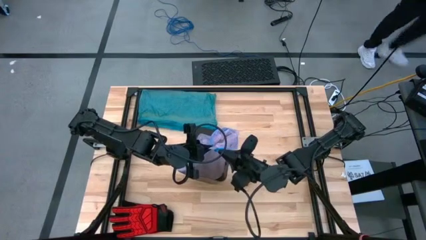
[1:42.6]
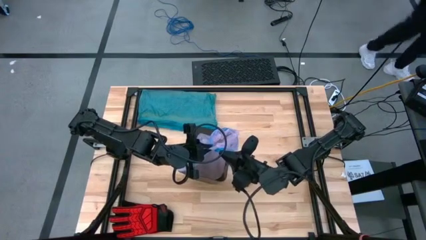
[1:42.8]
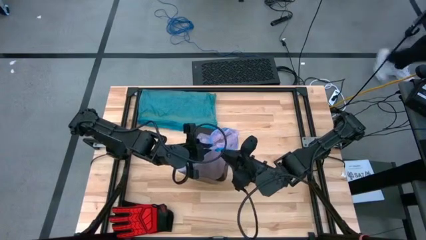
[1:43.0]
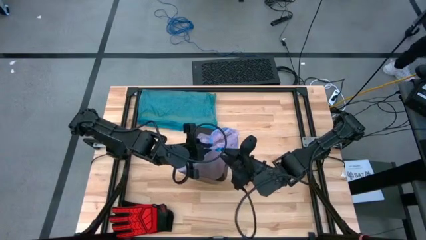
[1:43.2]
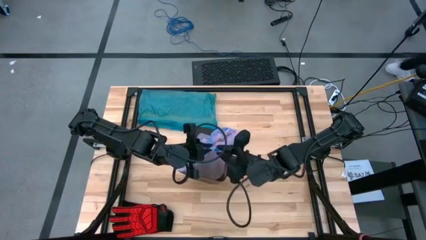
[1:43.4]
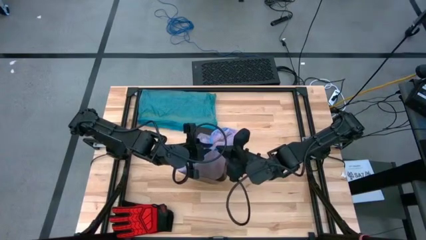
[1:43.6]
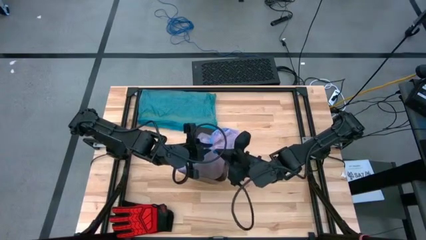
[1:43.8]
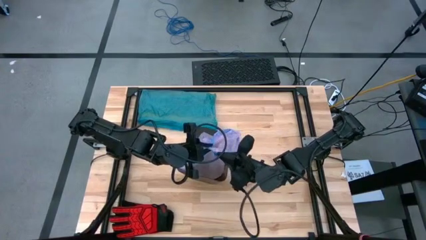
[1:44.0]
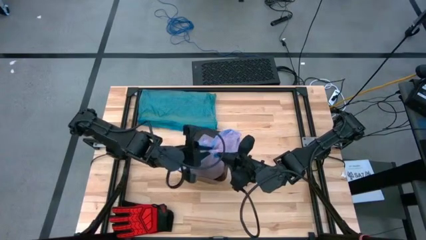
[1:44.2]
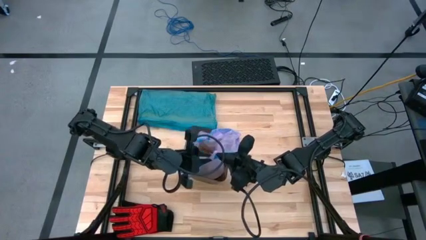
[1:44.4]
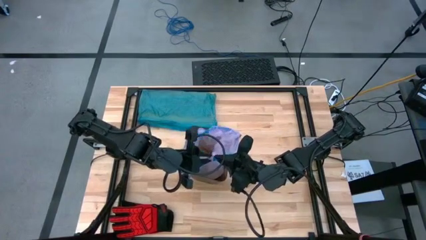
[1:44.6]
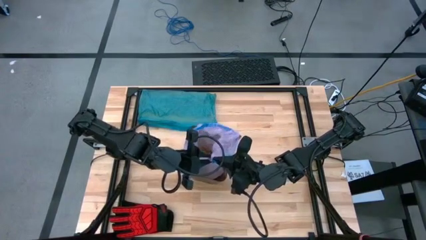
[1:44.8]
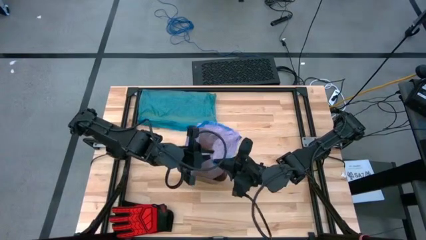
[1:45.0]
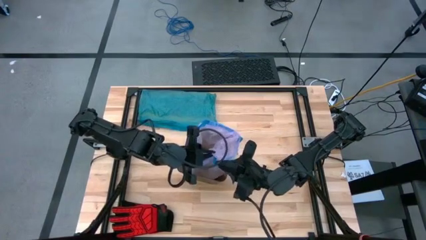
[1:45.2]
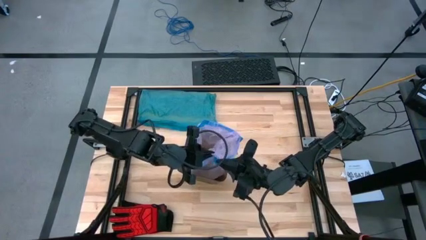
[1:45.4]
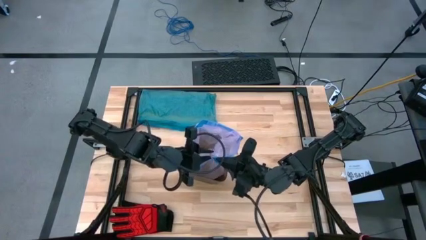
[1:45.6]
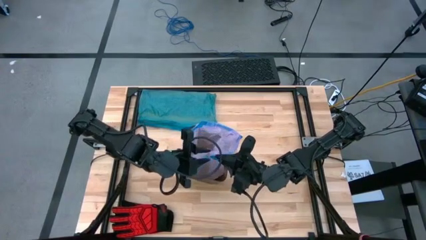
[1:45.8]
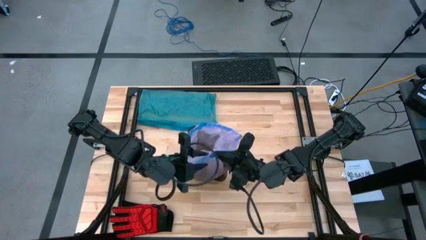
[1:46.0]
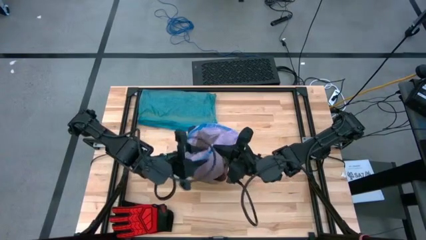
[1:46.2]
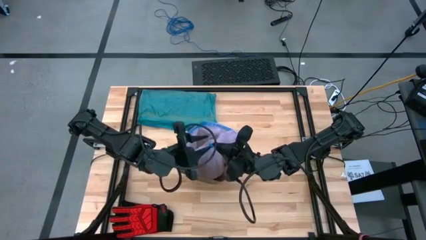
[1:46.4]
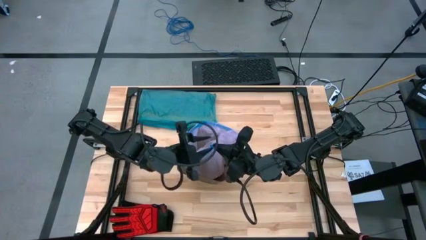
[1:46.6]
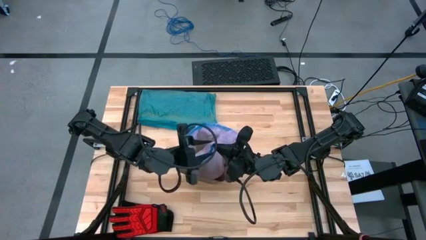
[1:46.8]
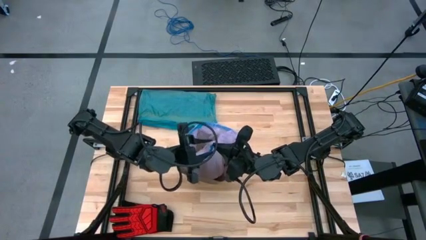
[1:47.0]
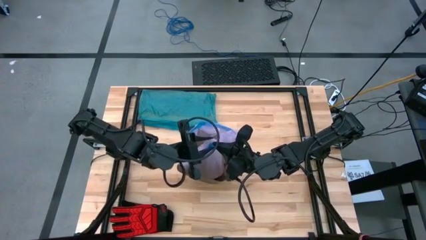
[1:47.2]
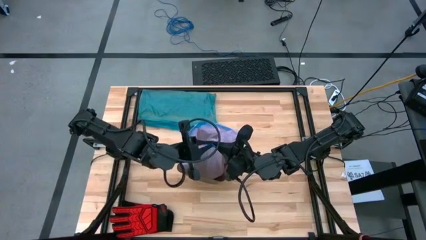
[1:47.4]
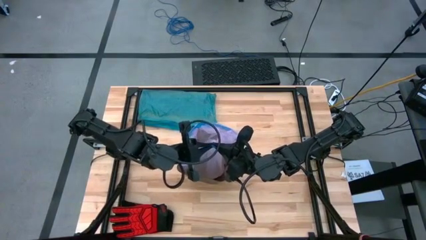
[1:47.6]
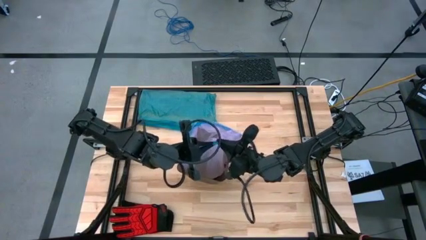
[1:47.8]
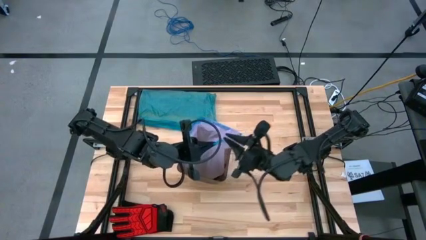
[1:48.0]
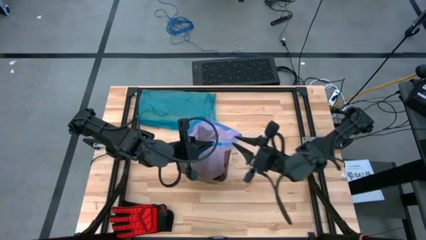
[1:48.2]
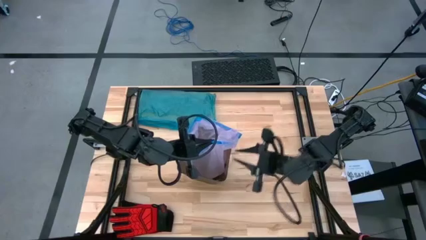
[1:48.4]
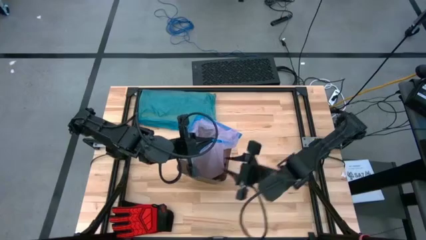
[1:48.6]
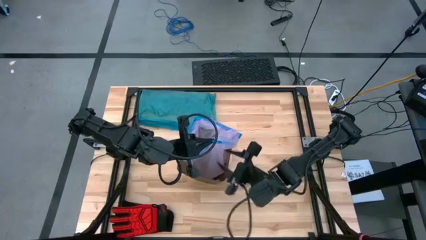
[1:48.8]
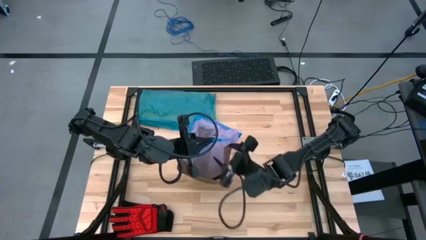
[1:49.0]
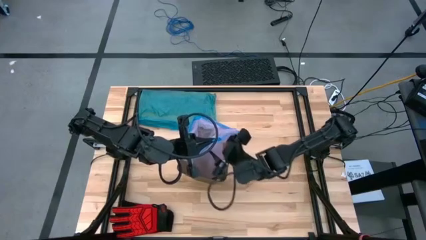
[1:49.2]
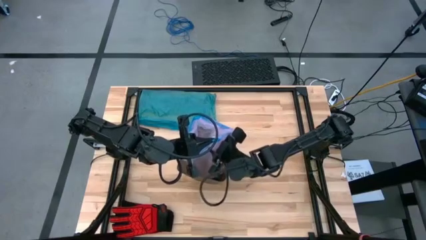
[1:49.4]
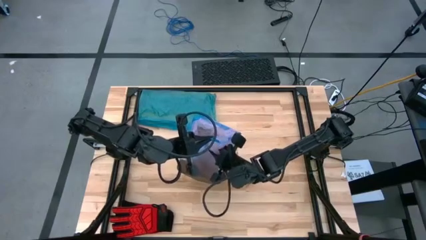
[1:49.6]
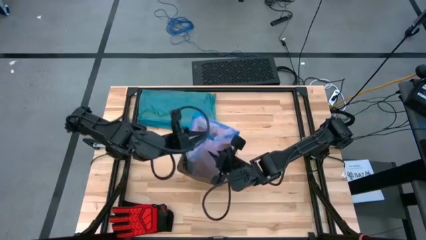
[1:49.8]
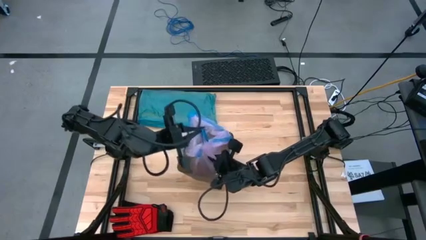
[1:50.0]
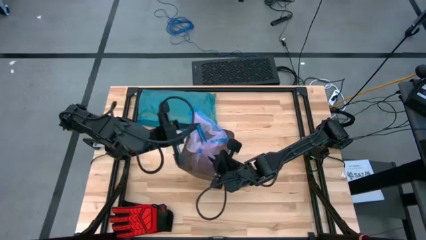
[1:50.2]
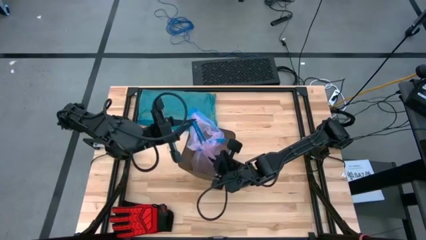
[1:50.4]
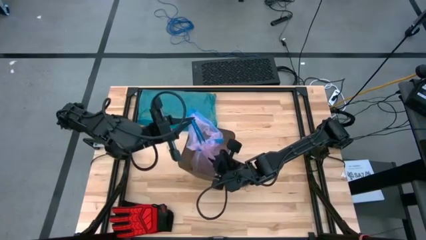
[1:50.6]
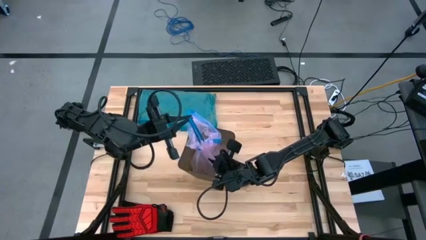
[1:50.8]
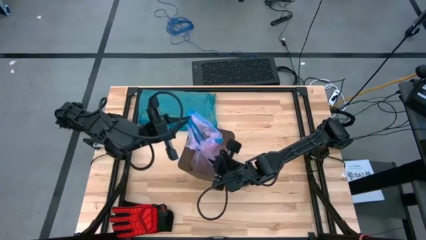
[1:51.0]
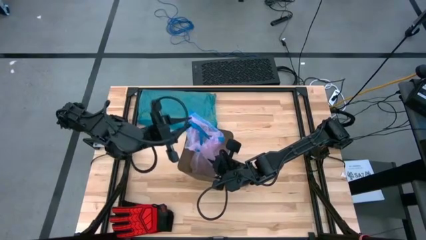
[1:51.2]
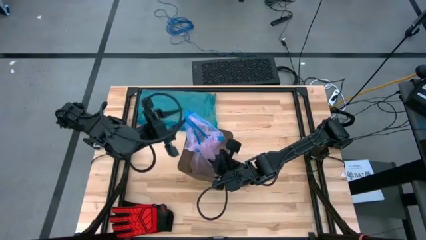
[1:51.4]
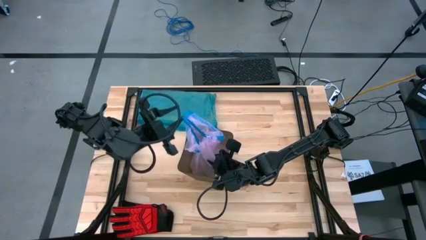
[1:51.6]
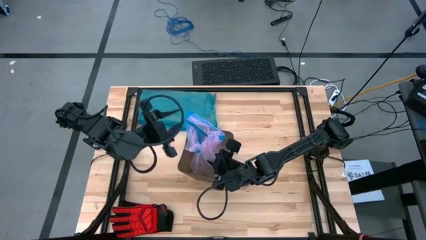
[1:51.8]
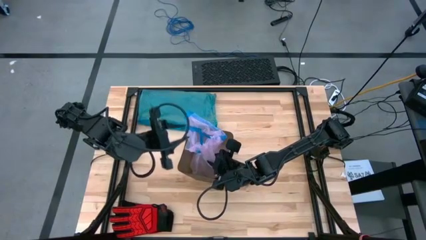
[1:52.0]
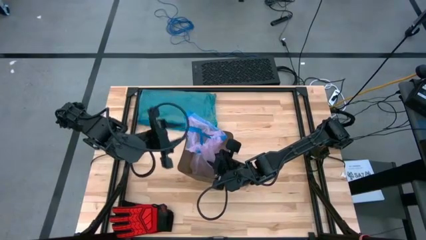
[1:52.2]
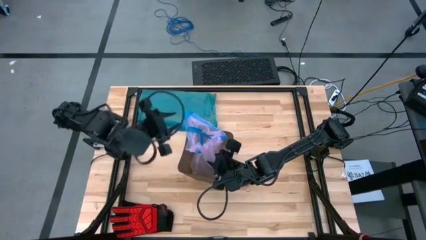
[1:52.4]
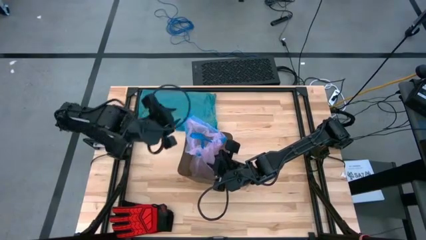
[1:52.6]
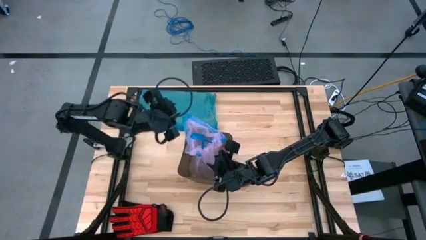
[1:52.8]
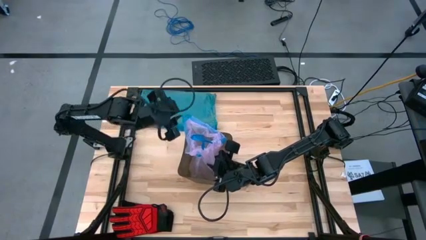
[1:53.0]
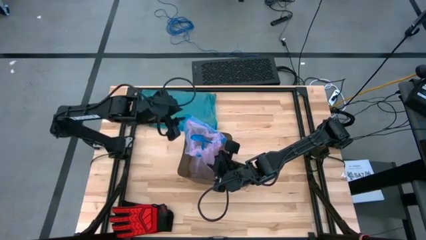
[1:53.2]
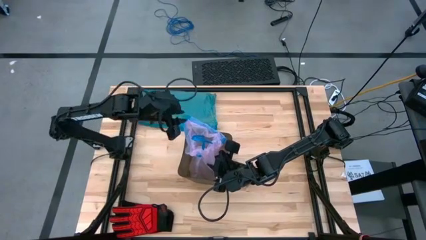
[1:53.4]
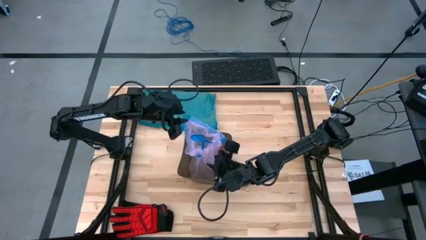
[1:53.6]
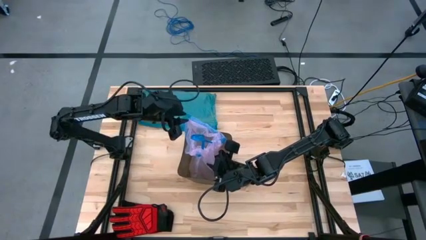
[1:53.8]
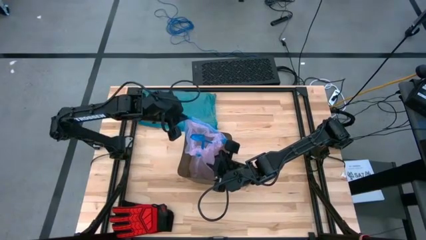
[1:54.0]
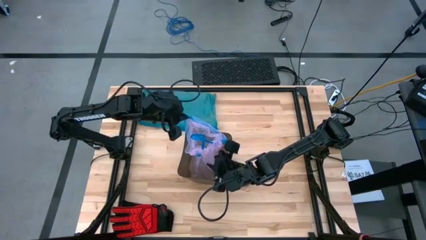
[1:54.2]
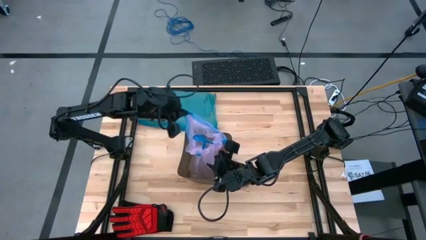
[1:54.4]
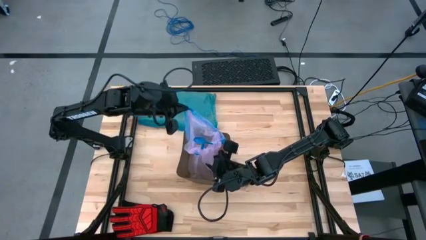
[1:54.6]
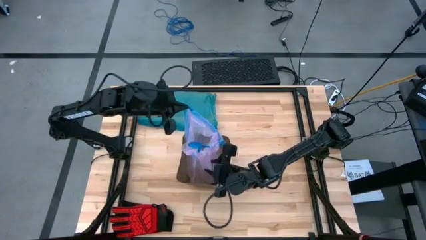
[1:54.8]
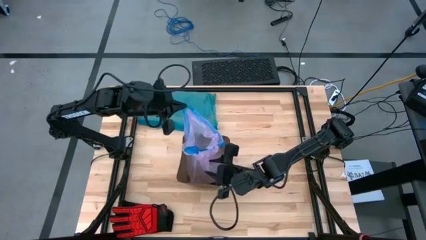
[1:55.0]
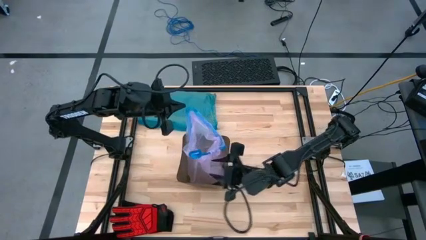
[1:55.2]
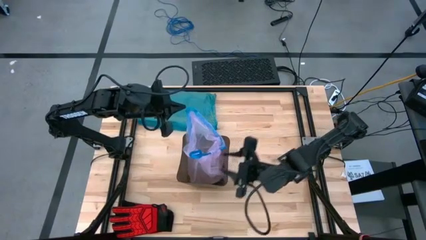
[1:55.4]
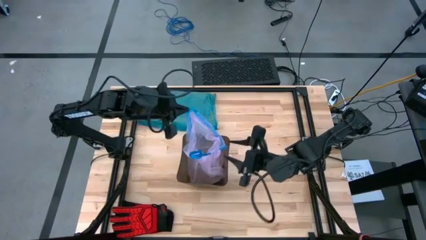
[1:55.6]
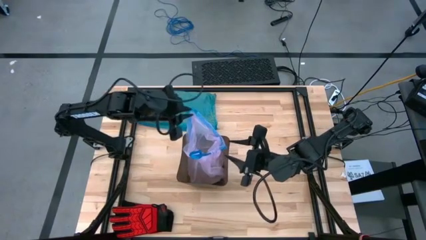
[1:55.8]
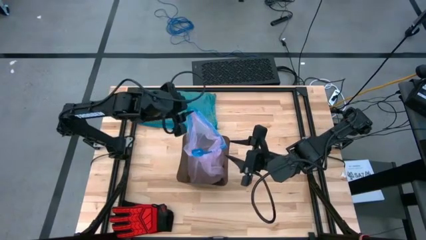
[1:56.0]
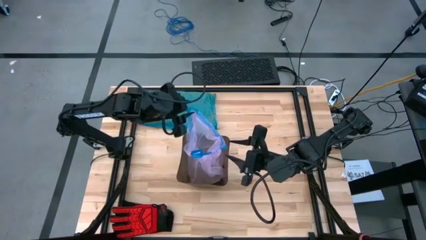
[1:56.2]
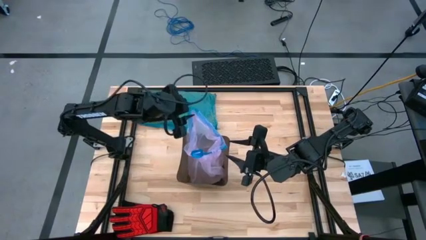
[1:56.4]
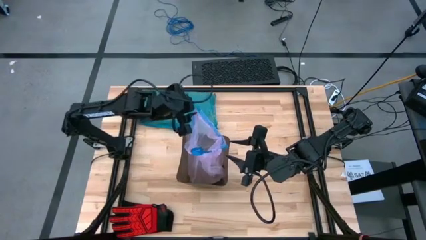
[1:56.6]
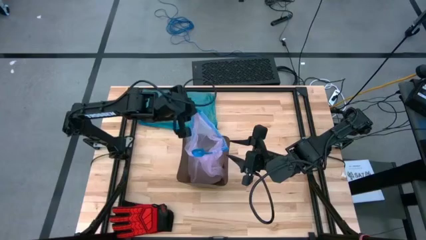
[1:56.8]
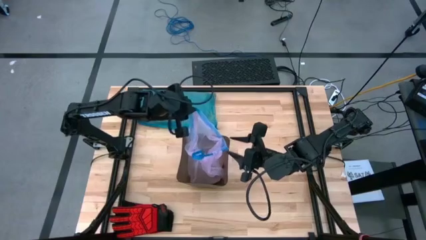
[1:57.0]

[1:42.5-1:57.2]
Task: place trash/remove bag and relplace
Remove the trash bag from the trash bin and put it on the top right of the table
